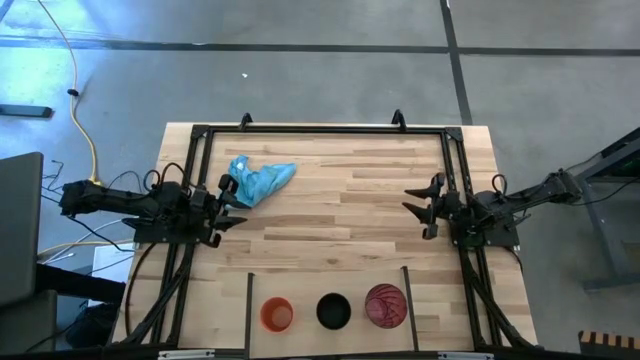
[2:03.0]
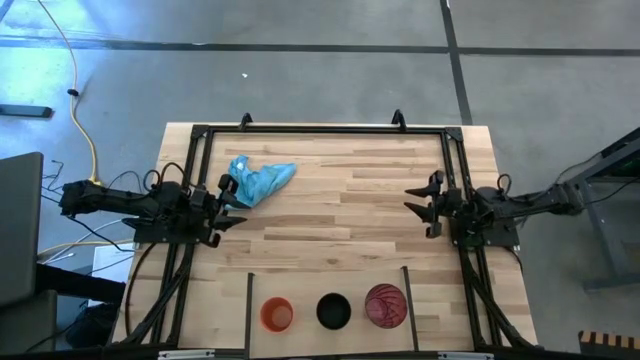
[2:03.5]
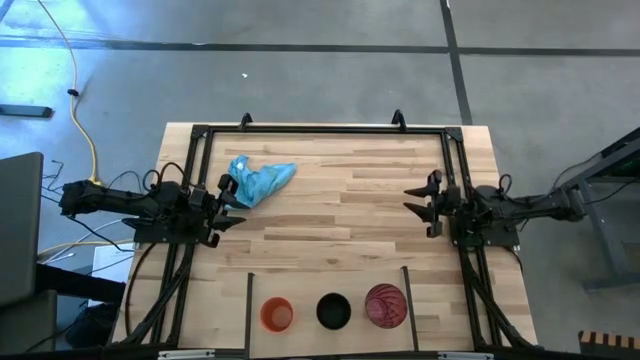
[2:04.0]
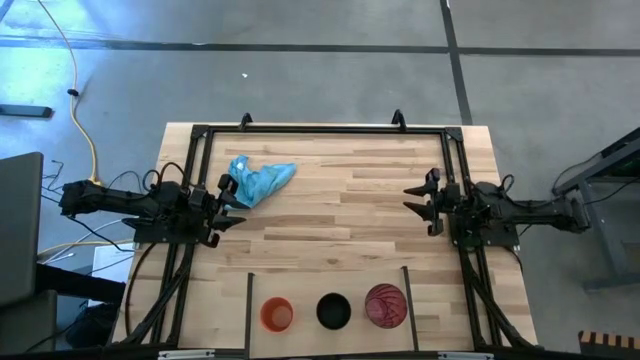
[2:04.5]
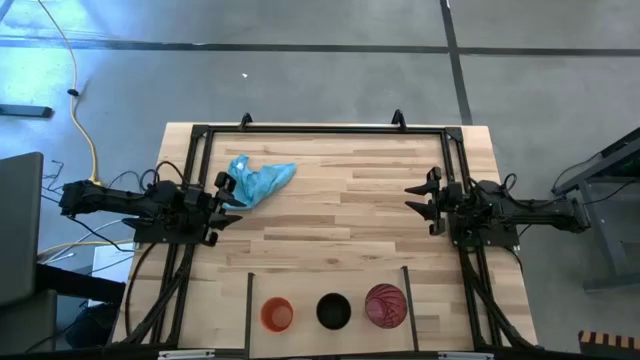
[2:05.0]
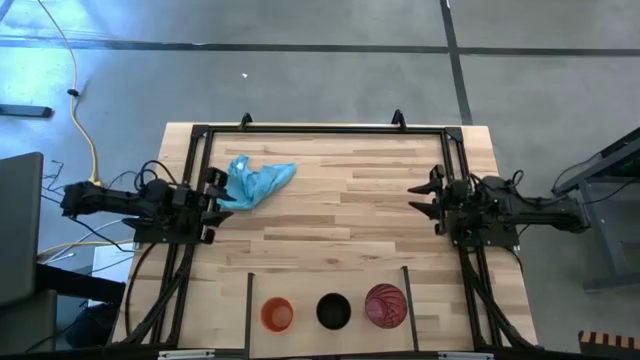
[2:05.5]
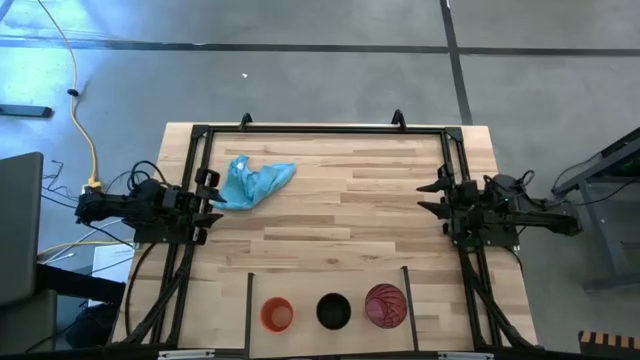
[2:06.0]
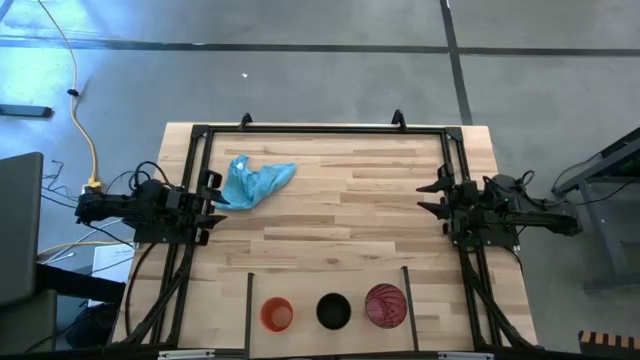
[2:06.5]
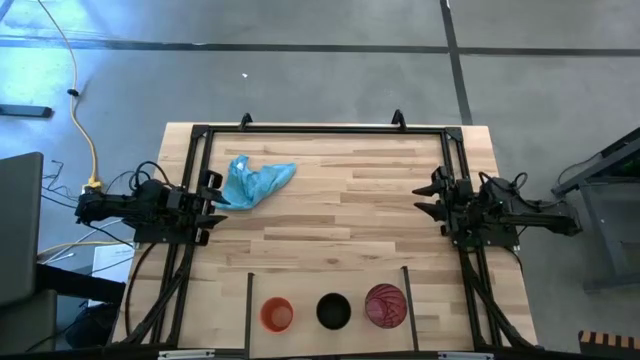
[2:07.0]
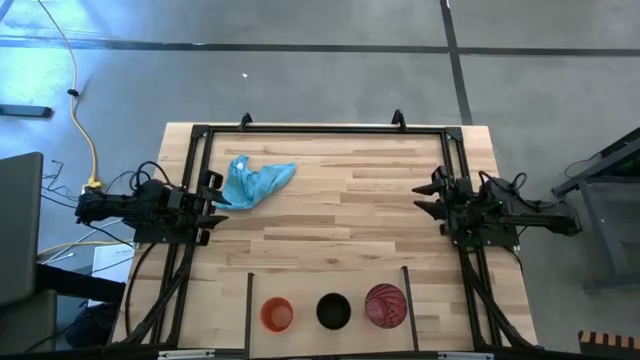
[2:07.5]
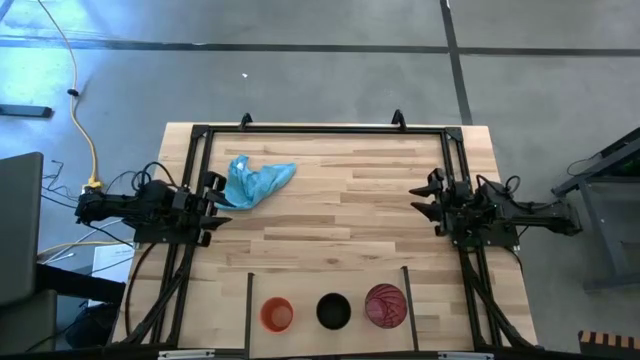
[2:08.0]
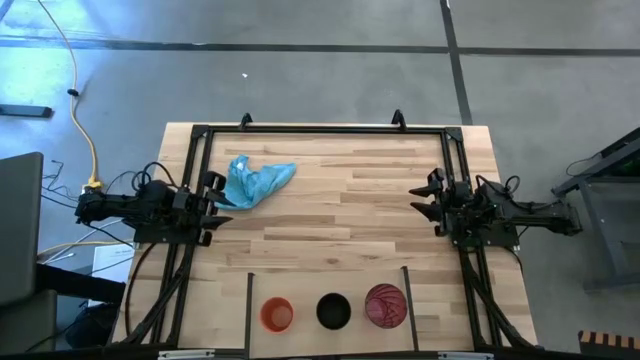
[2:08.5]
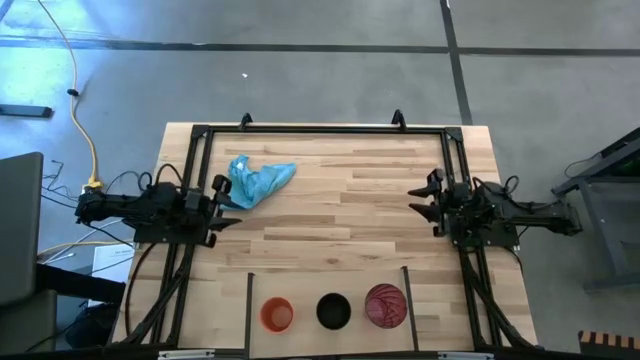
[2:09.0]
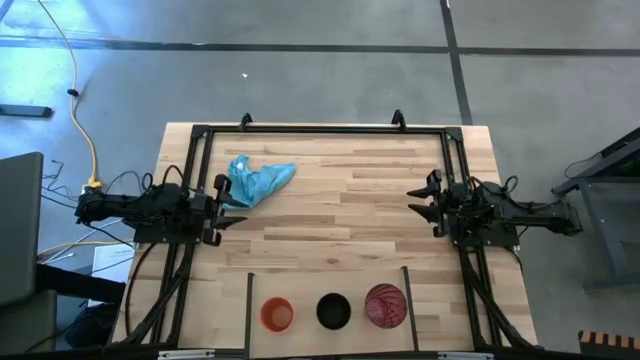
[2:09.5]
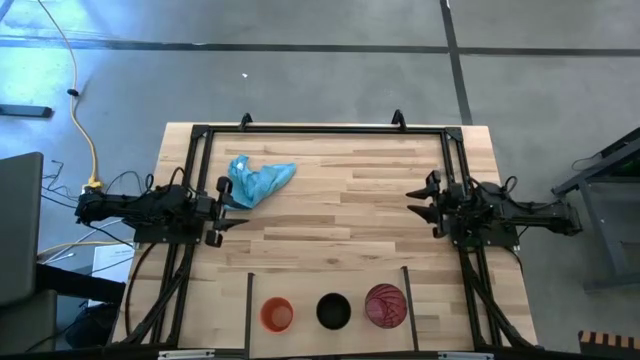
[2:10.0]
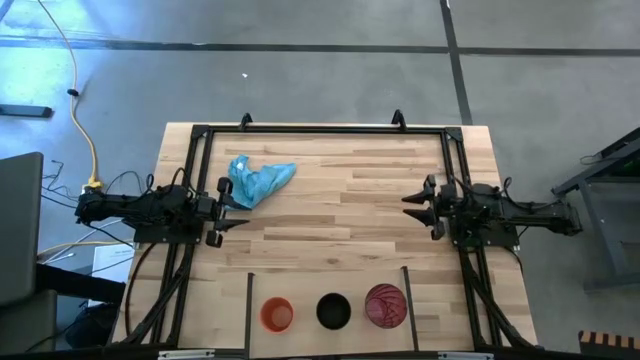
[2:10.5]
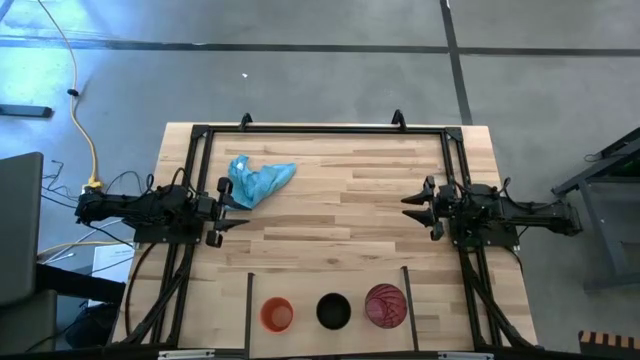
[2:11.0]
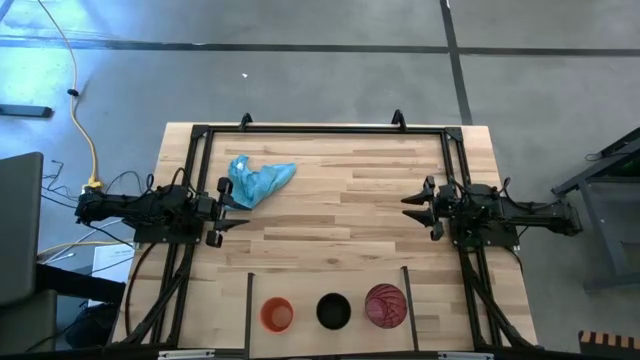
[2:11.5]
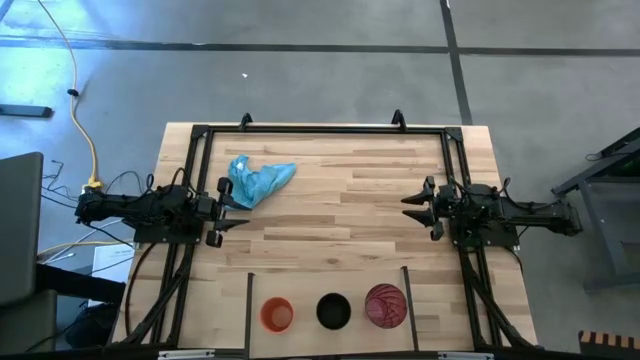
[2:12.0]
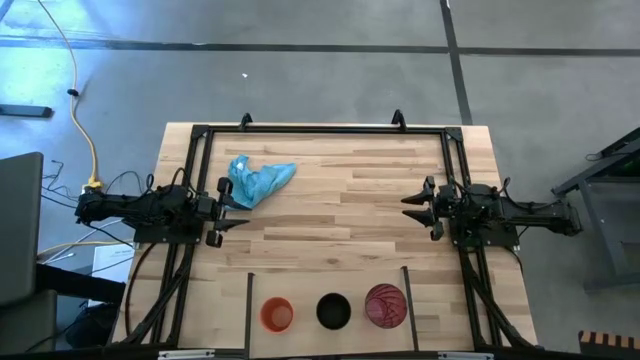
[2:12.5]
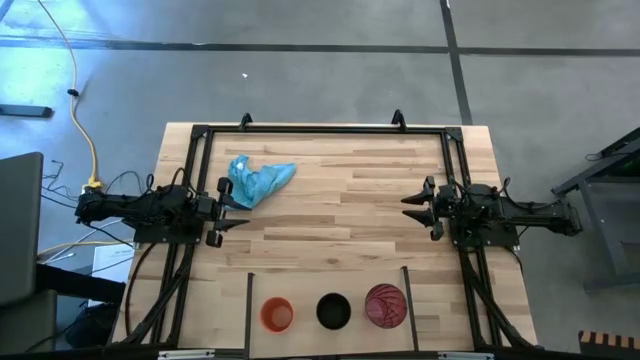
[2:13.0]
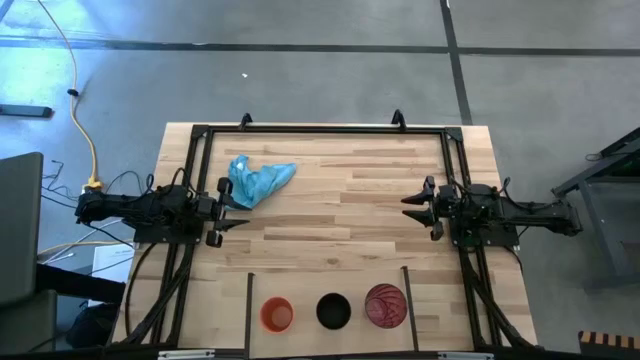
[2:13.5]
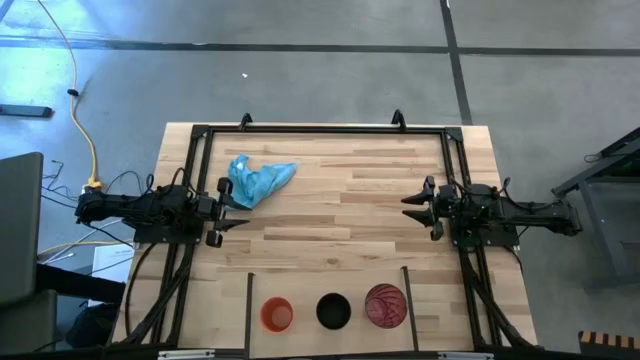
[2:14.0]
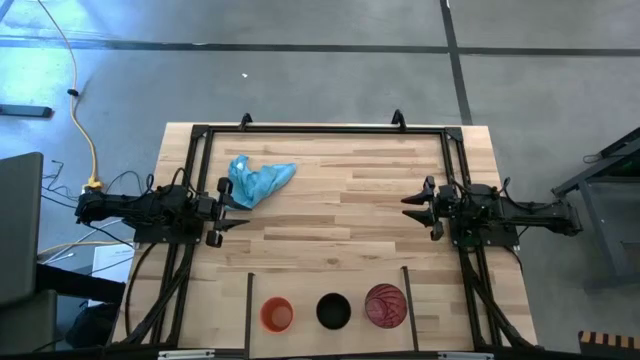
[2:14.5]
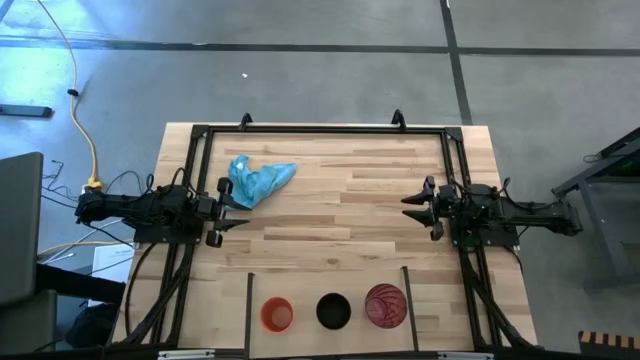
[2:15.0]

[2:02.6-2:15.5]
Task: Stack small to large cups/mugs on shelf
Return to Home Position

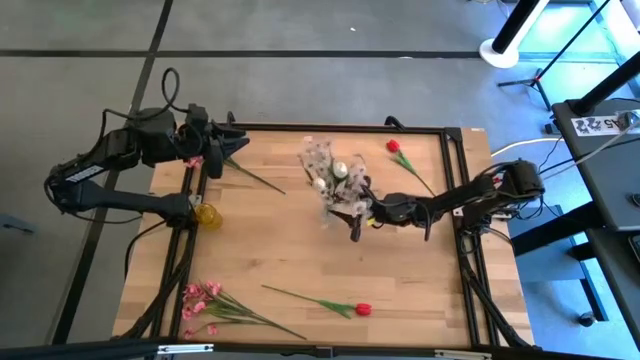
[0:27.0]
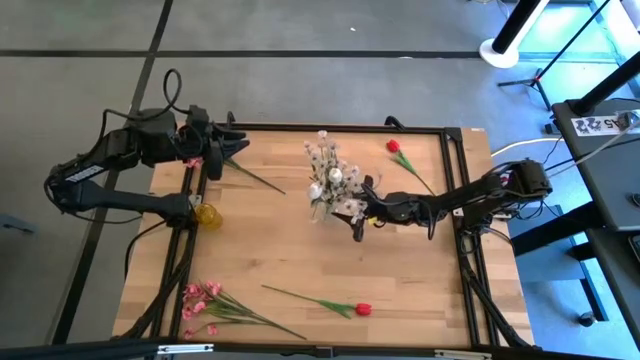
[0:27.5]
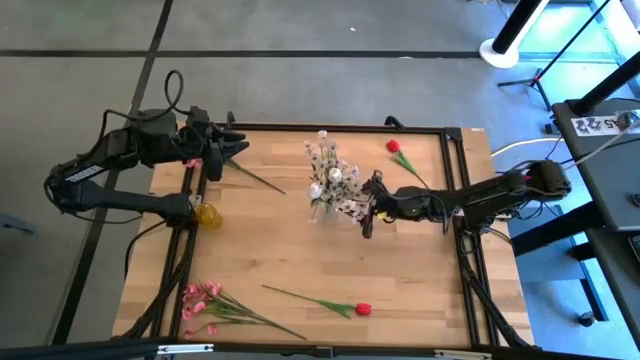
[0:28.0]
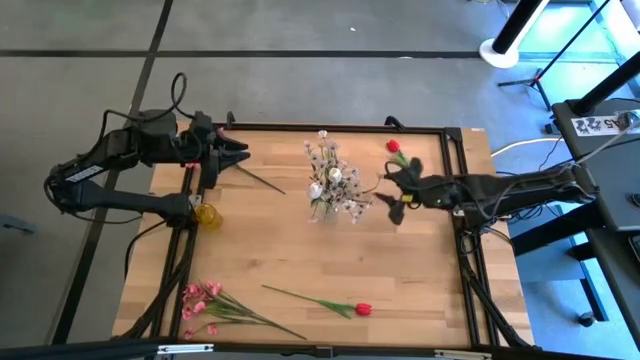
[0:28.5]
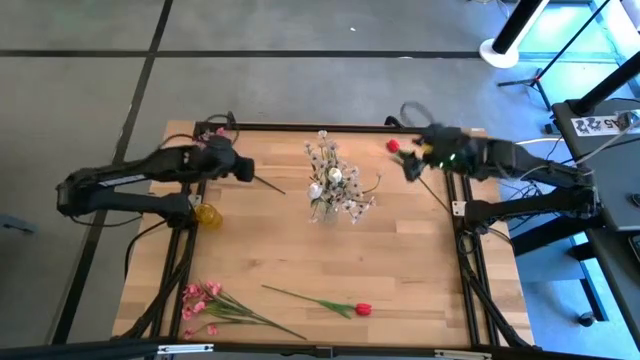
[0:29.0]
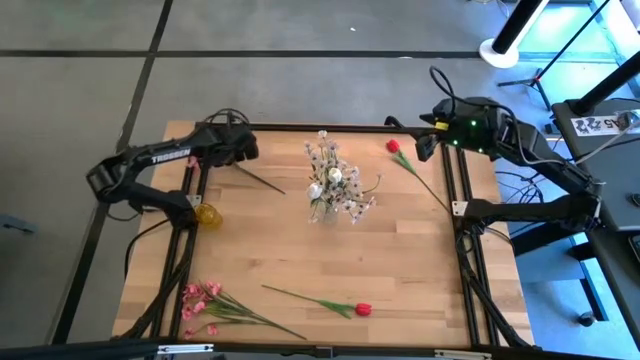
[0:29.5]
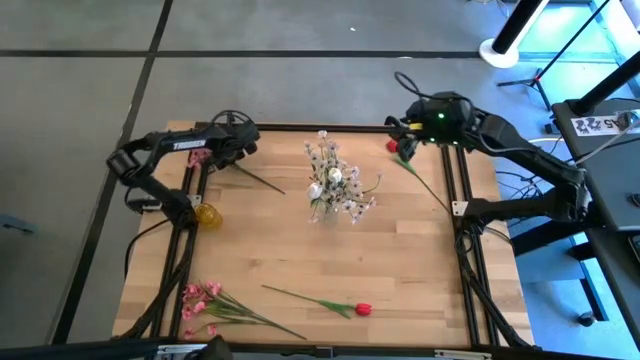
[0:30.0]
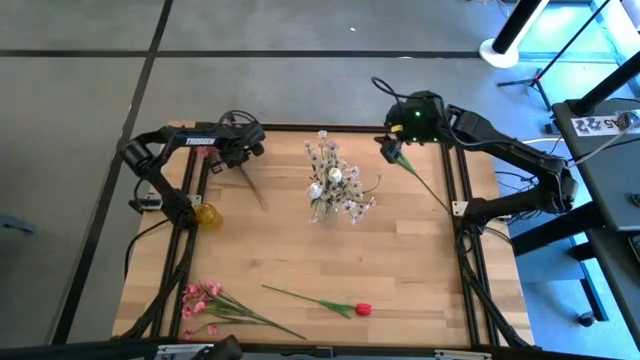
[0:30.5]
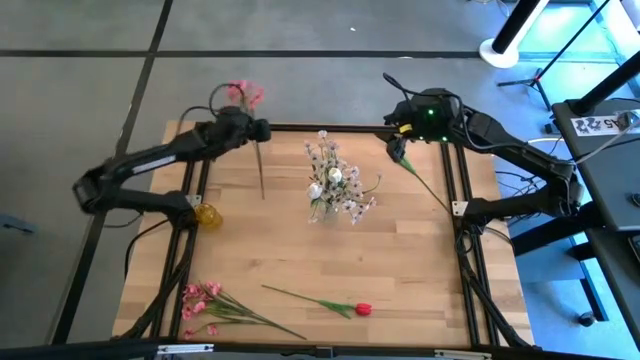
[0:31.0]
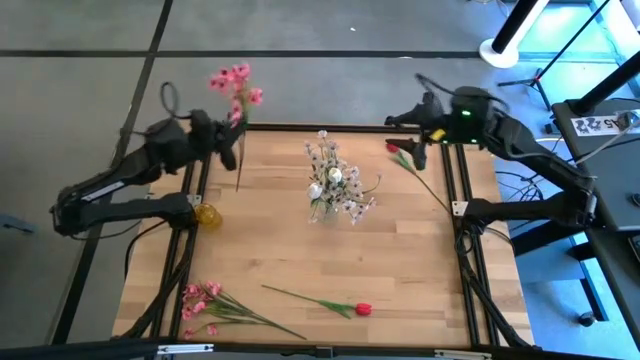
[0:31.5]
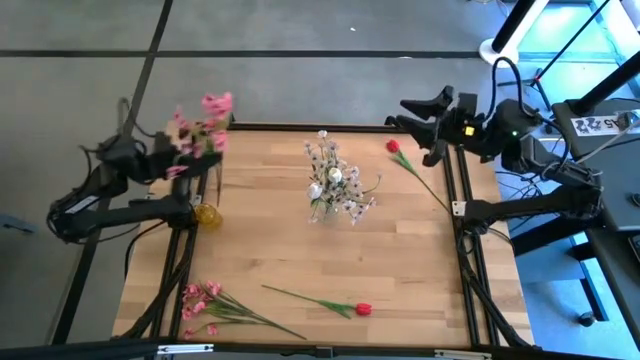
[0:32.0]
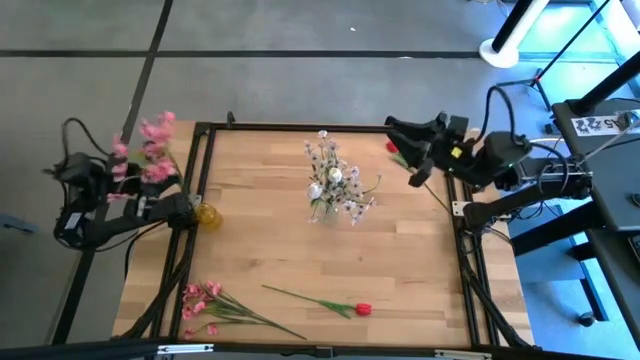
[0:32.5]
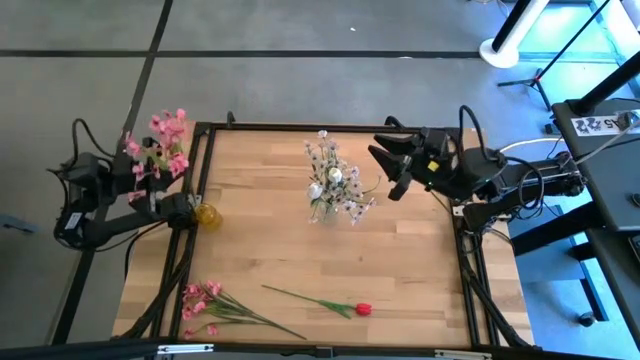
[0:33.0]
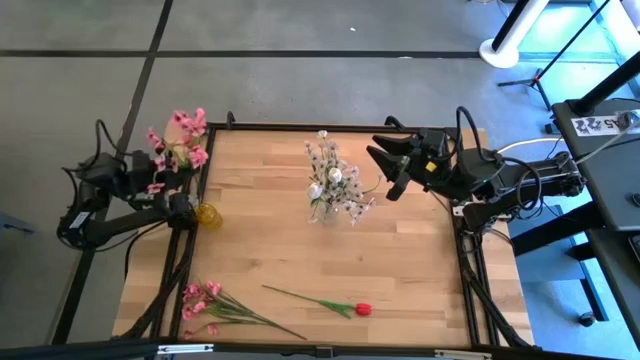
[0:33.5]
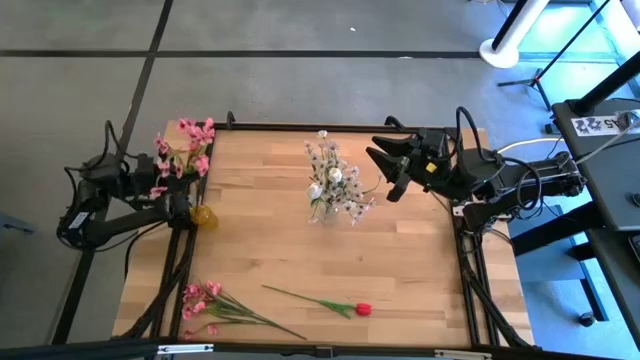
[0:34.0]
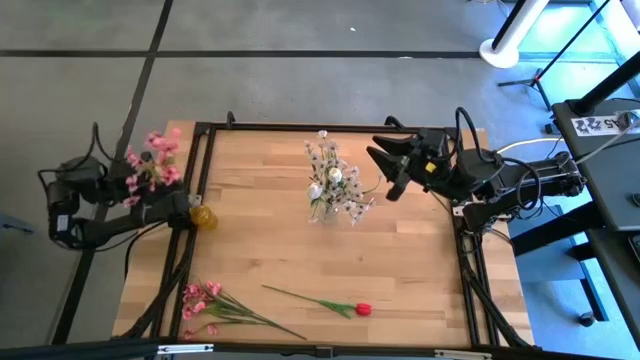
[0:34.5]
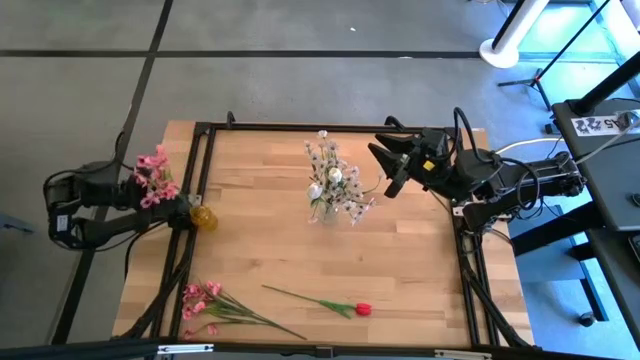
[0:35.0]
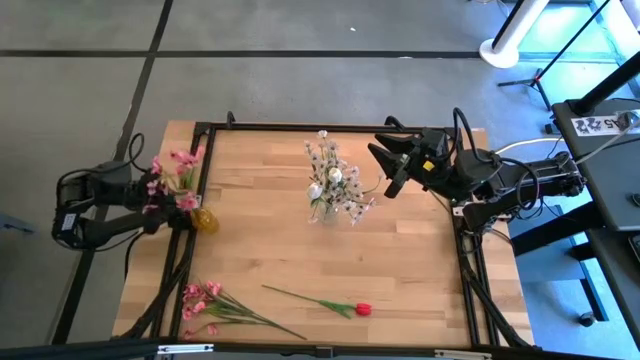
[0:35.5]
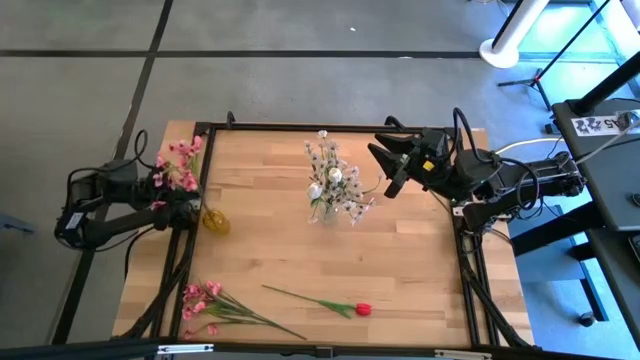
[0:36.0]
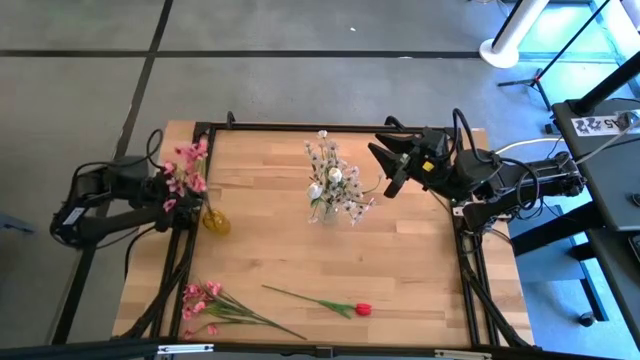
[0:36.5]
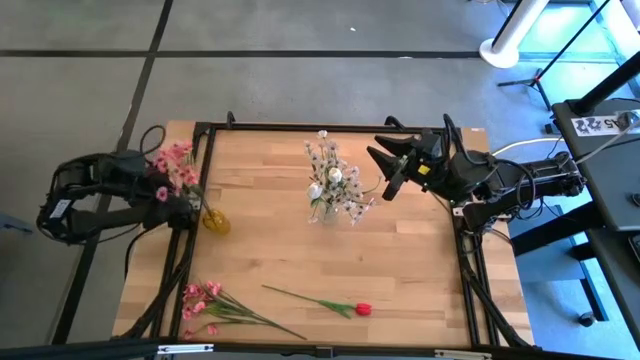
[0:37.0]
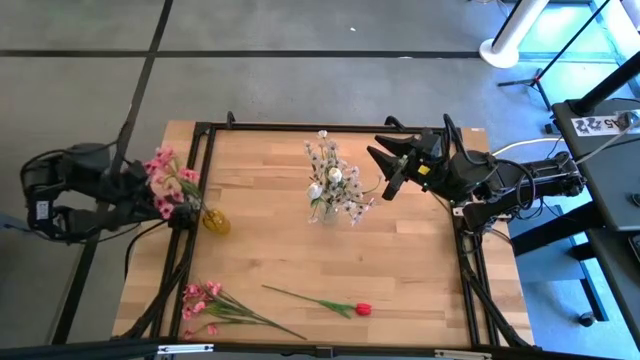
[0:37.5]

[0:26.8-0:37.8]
Task: Sort flowers into vase by color
Put the top pink flowers into the yellow vase
